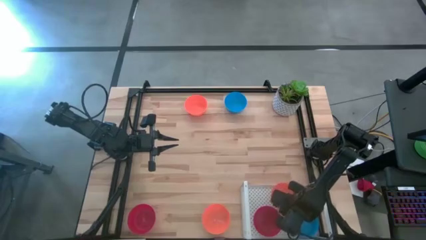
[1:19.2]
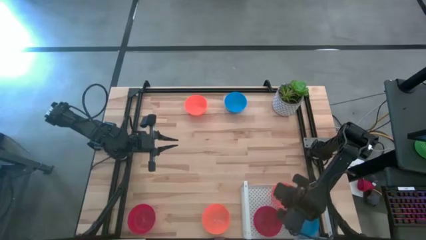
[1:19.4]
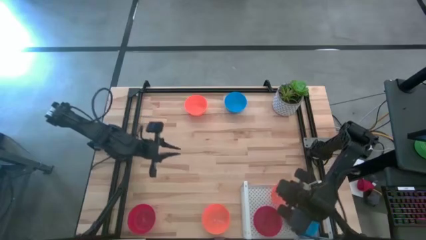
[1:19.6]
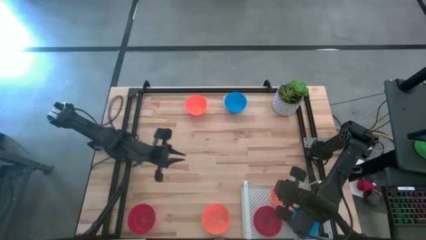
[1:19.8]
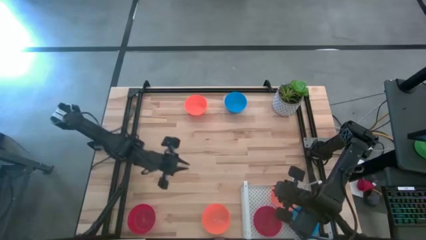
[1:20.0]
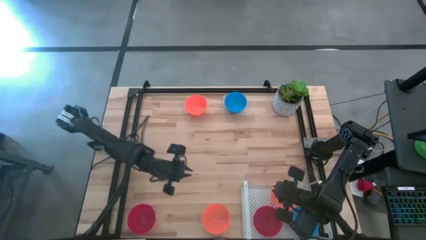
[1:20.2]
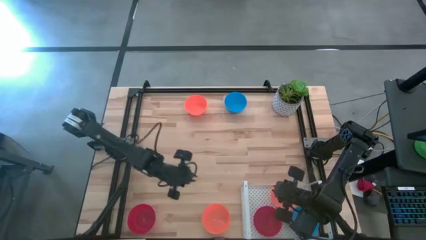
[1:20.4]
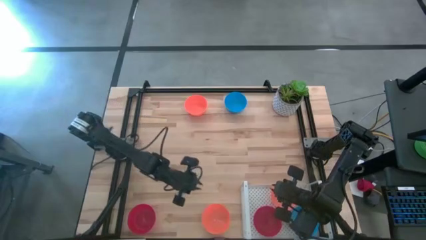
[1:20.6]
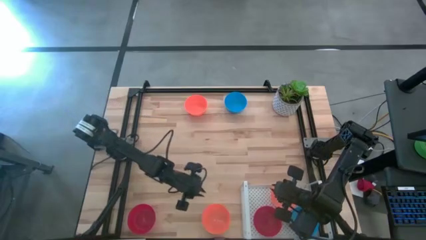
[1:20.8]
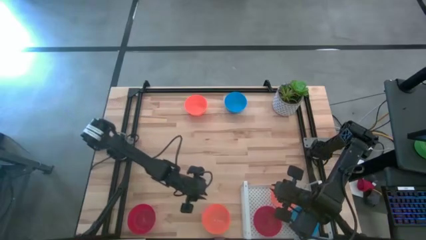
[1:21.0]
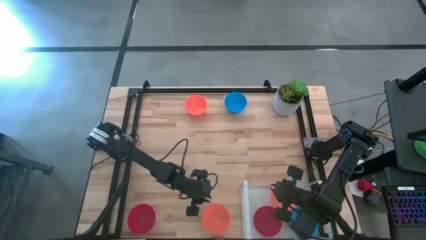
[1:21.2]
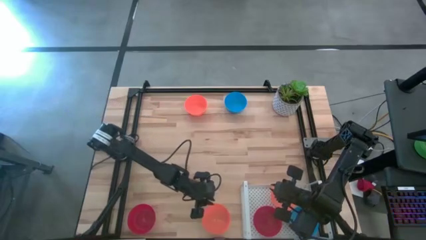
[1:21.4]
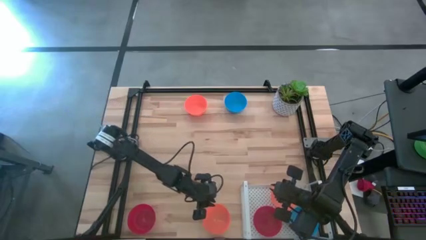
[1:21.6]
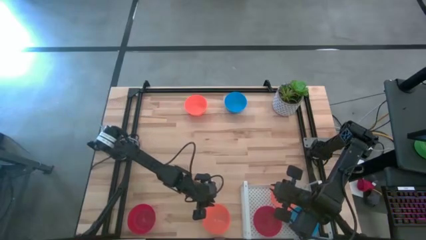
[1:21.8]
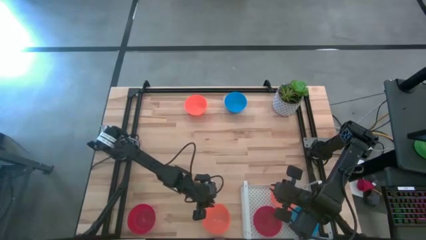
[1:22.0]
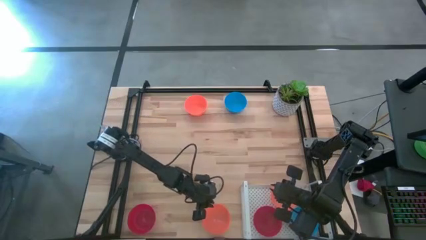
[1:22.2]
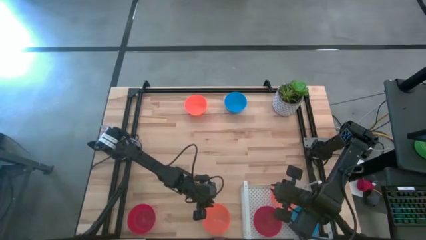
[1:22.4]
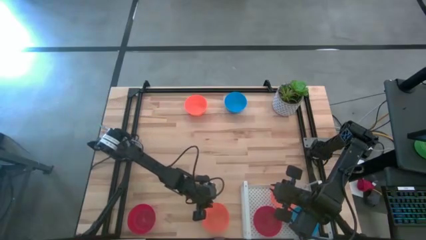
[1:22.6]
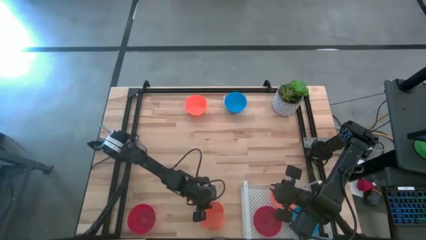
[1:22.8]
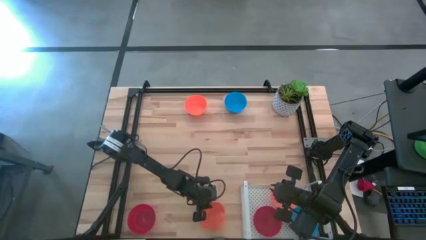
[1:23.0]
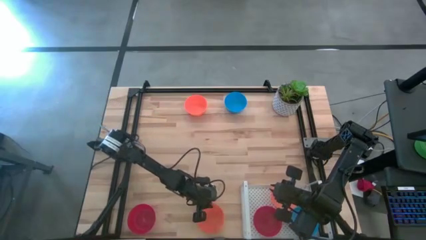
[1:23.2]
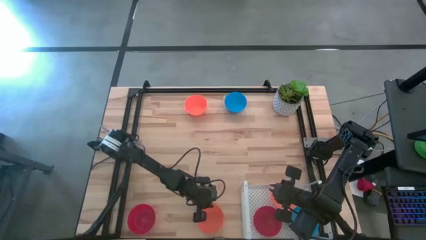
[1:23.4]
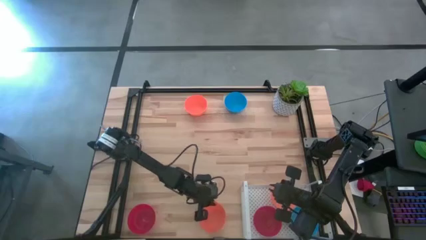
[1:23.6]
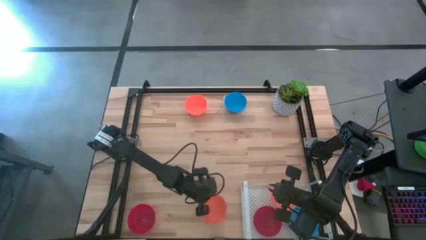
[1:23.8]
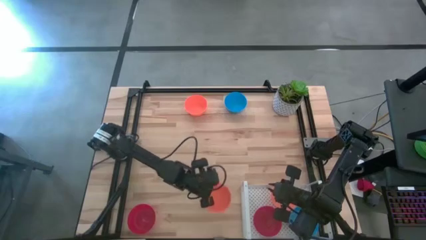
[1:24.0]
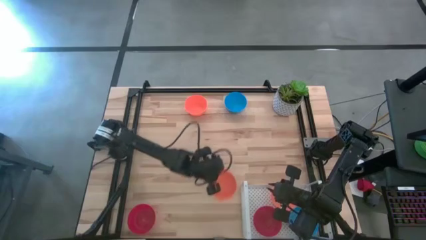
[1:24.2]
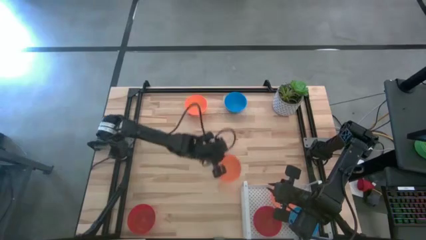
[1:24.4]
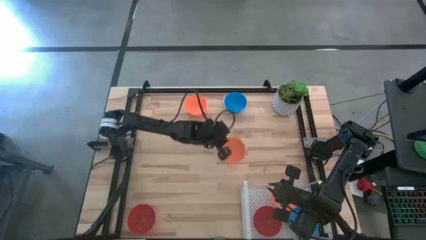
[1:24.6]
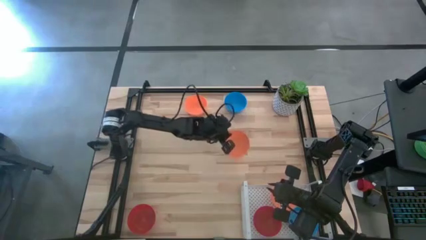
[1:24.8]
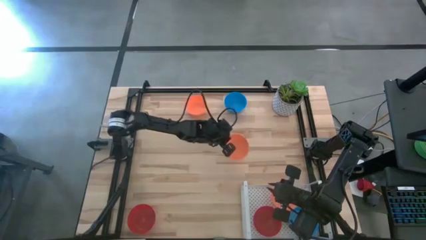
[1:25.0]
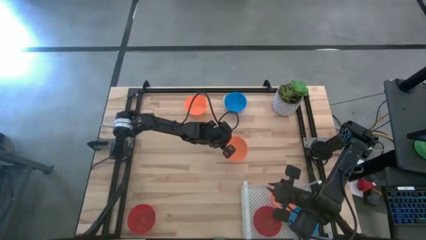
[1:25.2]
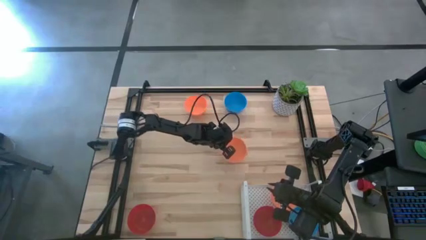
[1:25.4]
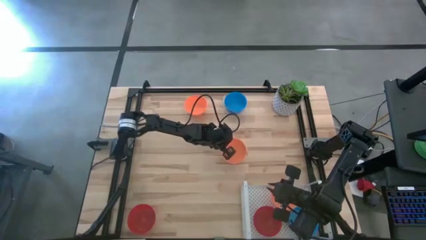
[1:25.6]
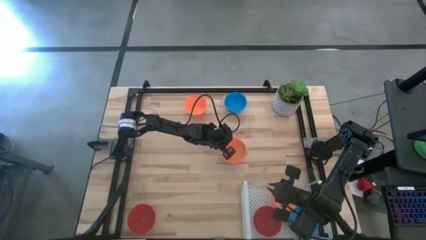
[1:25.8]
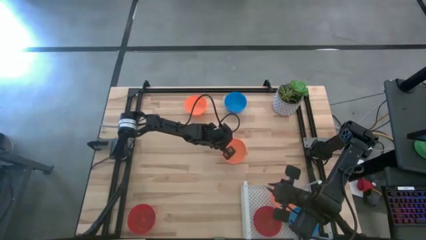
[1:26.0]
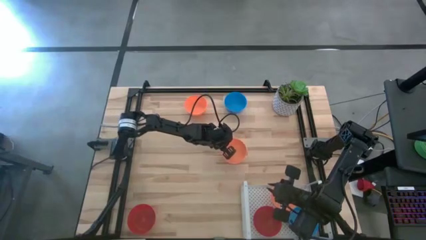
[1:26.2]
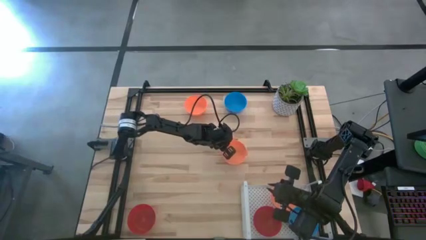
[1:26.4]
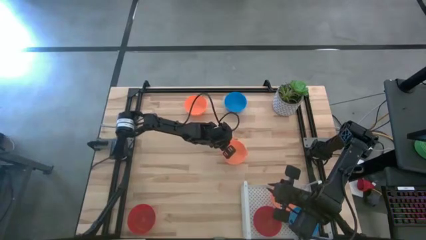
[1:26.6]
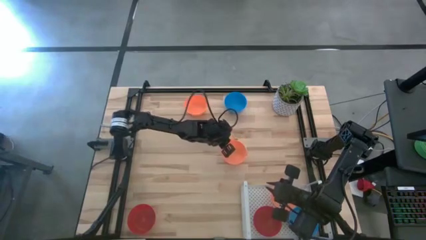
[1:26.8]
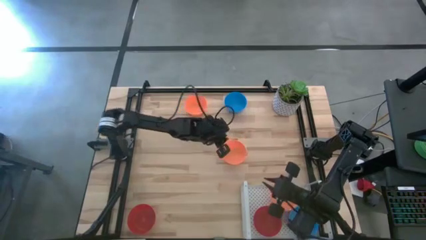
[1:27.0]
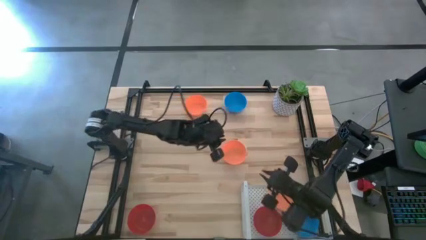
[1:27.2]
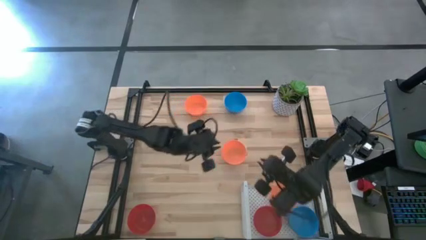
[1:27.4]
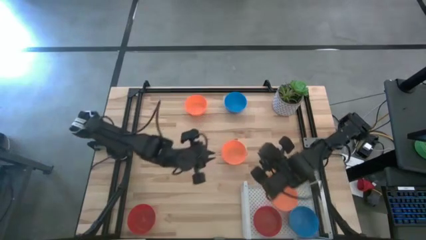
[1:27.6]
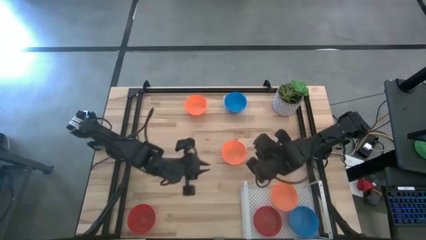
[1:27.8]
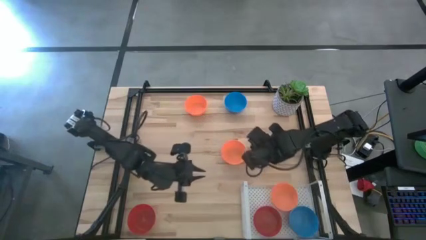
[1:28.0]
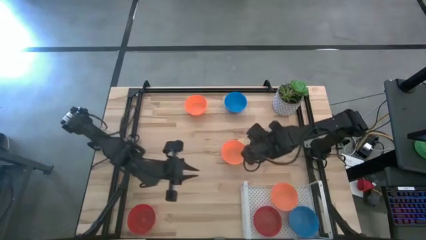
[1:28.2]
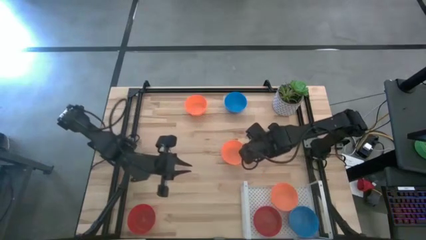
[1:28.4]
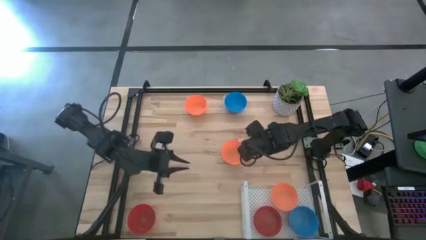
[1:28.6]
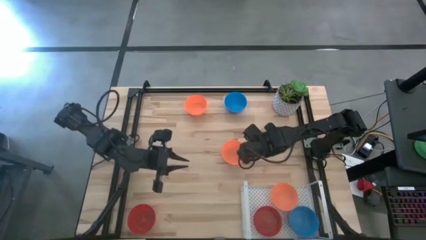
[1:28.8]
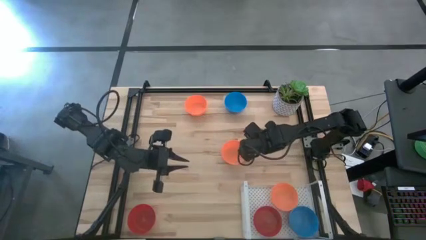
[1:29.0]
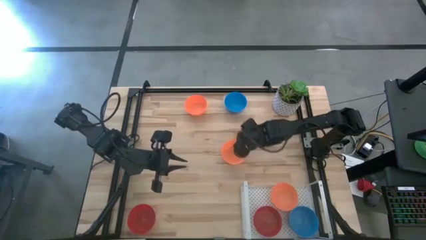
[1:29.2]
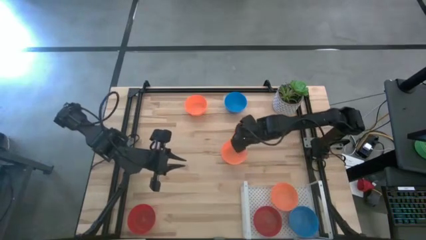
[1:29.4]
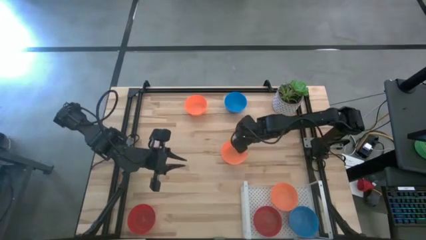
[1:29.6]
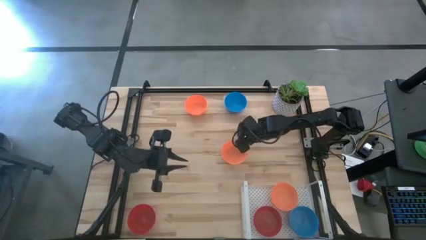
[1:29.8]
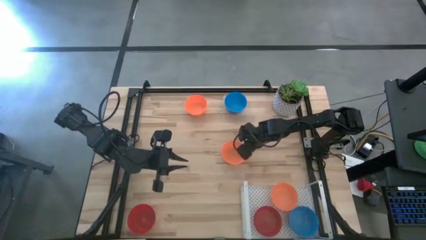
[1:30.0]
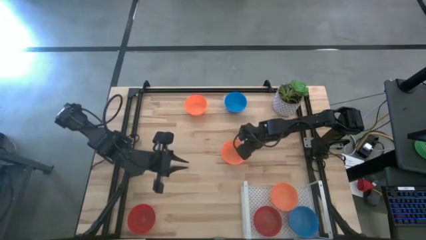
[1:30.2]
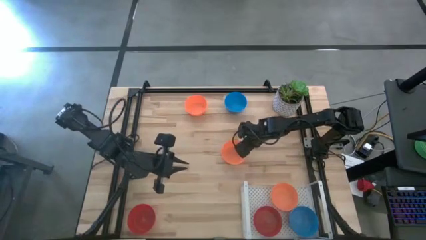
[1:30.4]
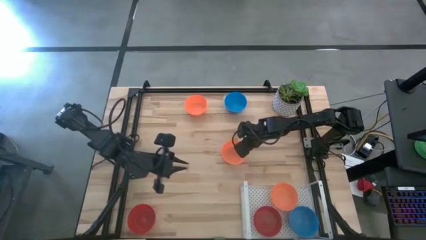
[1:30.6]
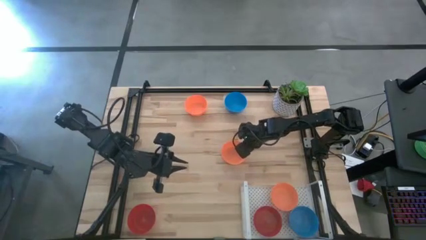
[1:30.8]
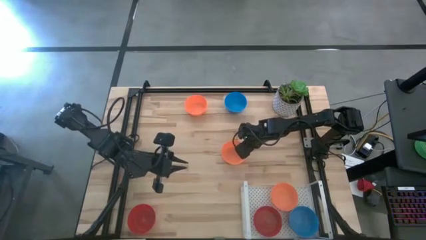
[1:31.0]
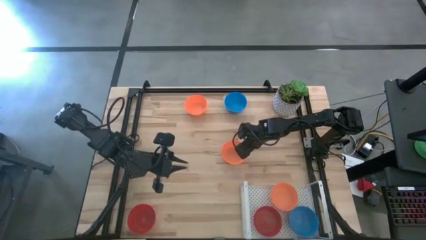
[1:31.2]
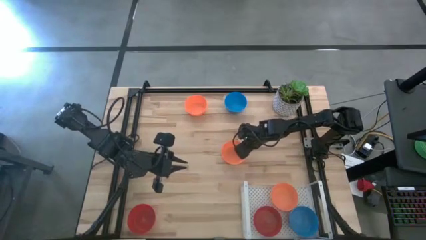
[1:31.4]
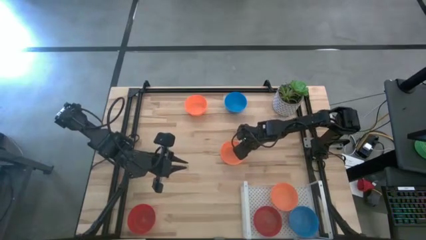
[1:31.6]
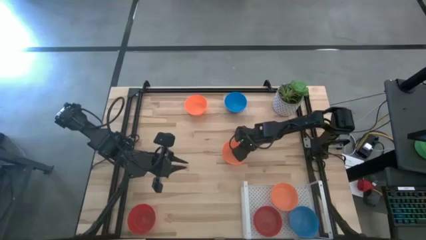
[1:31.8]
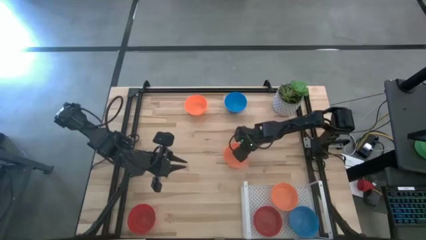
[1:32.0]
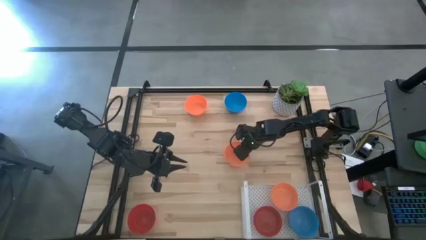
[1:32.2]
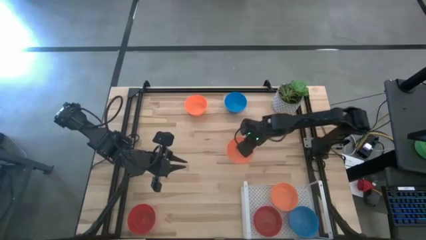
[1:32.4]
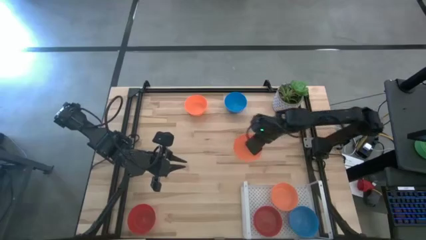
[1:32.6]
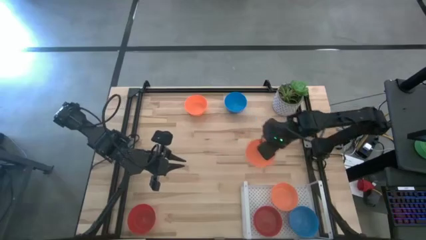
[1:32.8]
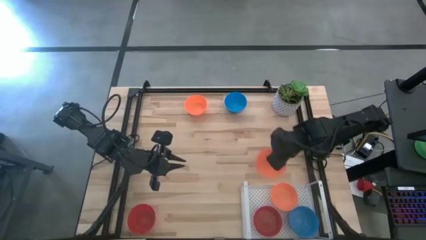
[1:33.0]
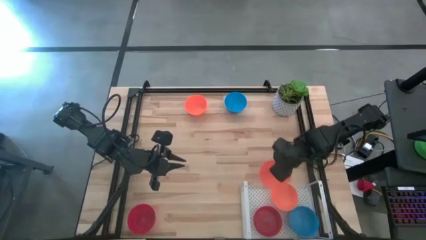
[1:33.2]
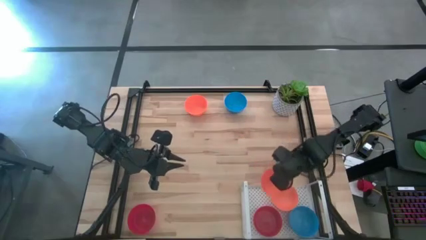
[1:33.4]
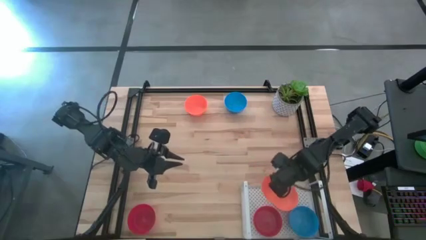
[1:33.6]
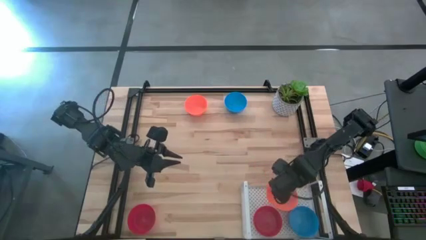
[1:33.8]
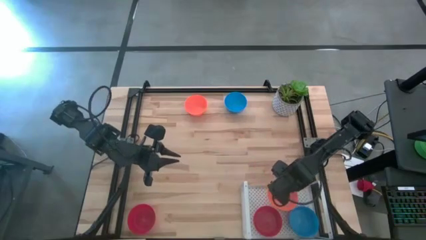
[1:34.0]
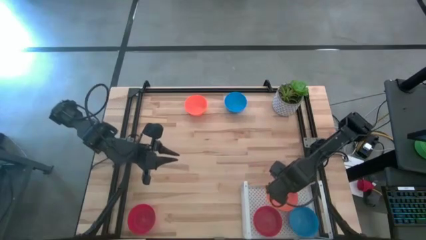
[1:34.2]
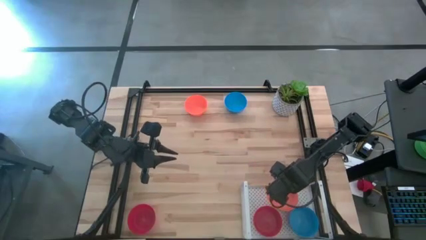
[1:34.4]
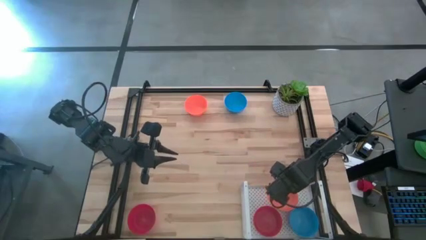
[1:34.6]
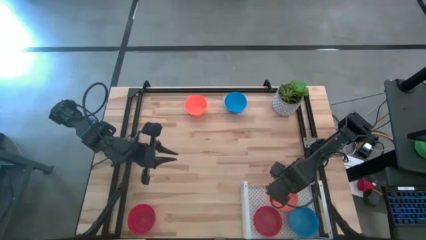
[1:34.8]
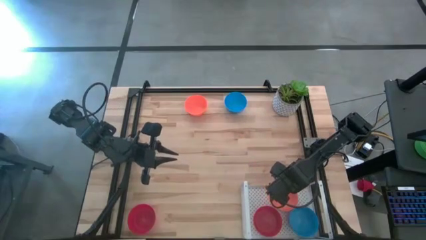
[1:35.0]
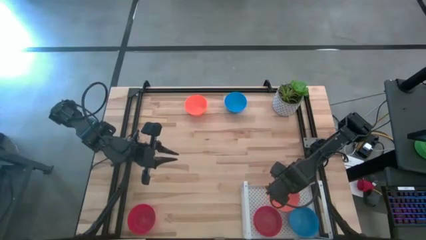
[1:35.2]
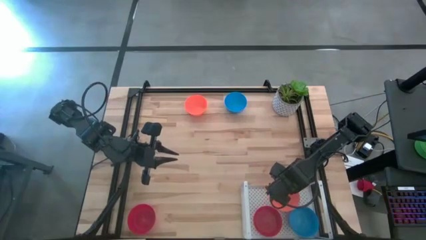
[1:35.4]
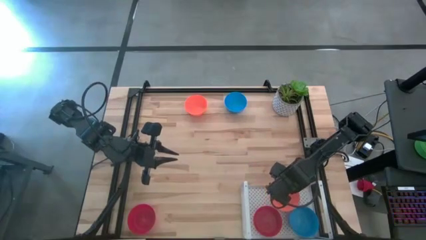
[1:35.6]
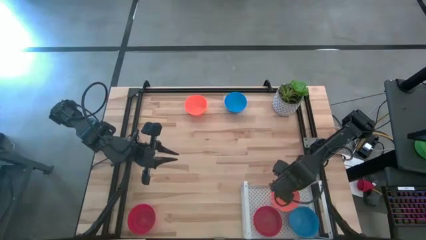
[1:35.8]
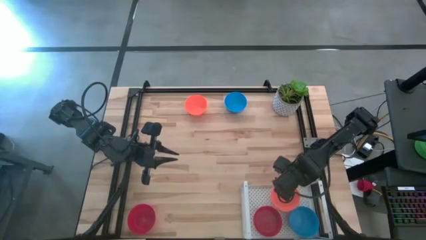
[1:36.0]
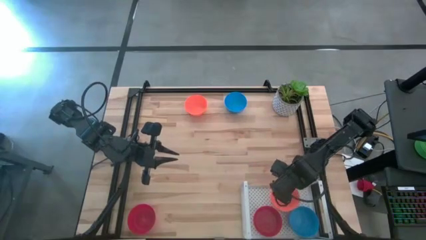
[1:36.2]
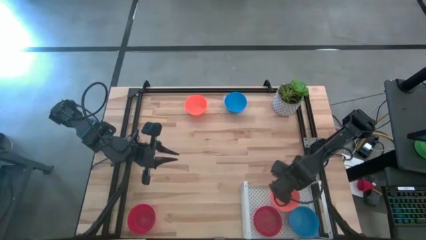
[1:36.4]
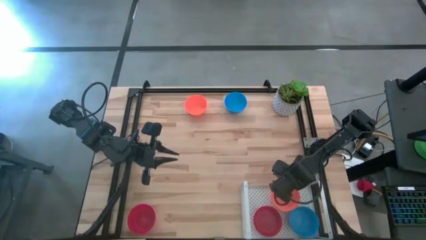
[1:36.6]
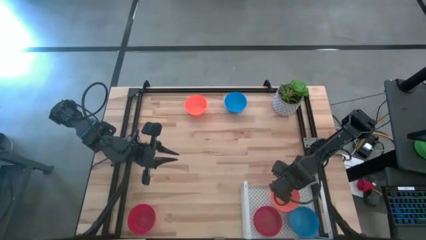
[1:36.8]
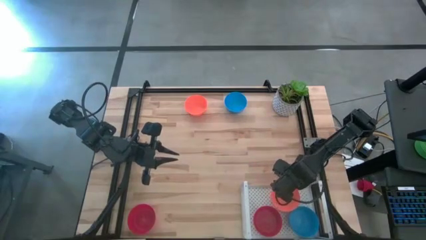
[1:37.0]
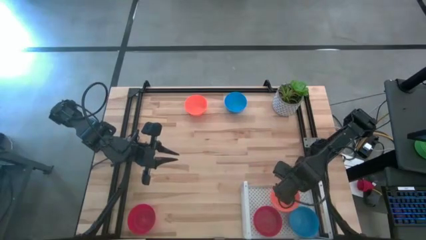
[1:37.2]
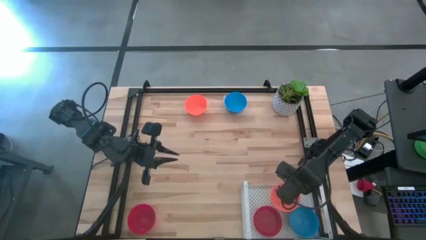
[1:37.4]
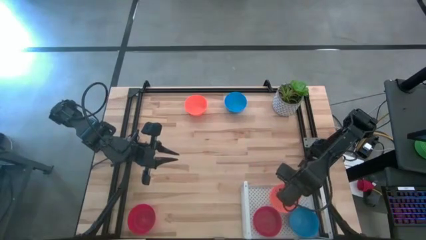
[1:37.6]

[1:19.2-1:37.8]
Task: Pick & Place Mini bowls
Stack the bottom orange bowl on top of the orange bowl on the shelf
